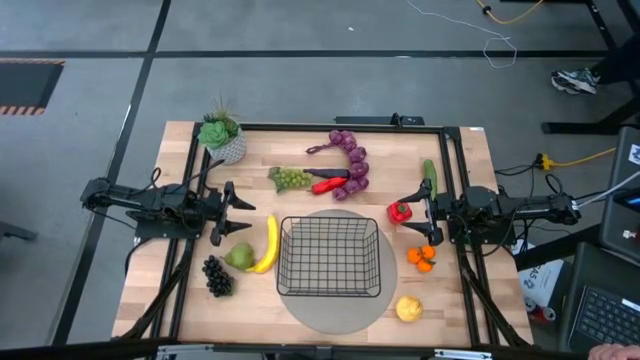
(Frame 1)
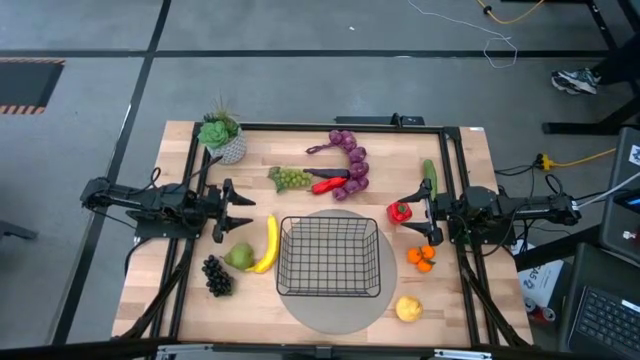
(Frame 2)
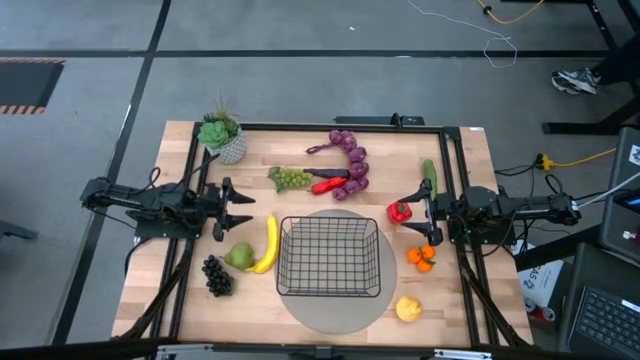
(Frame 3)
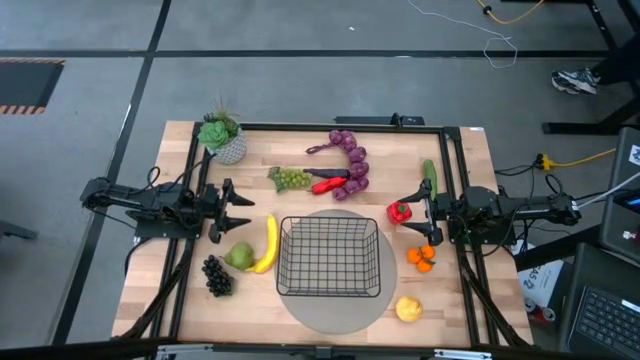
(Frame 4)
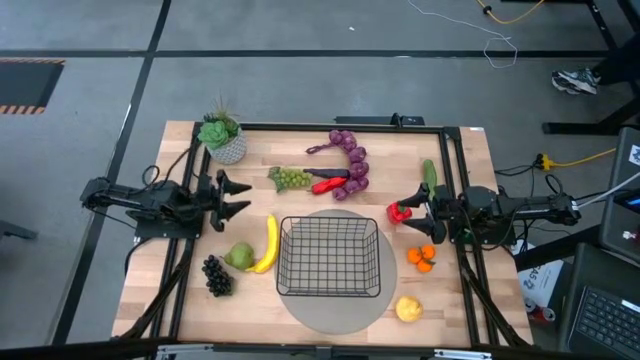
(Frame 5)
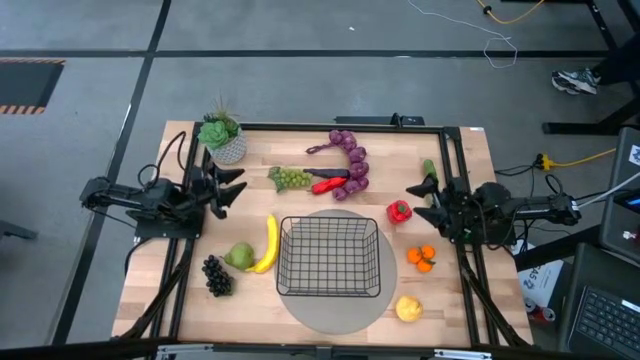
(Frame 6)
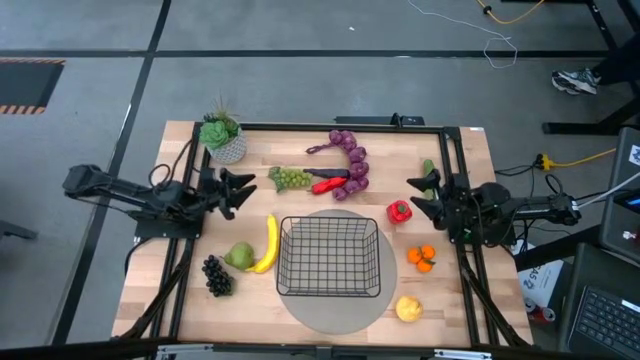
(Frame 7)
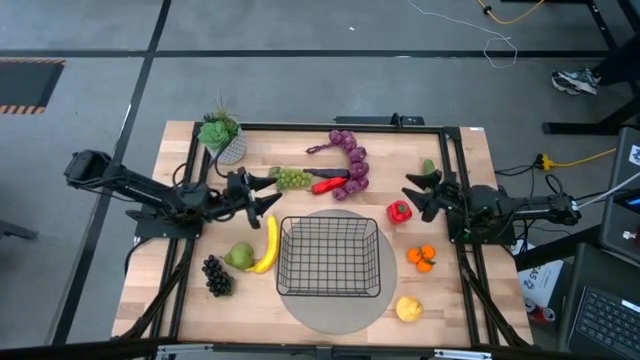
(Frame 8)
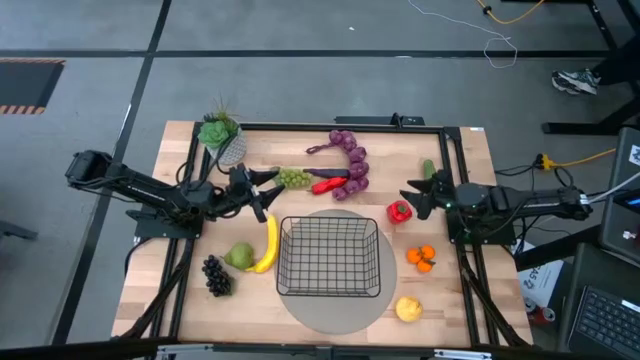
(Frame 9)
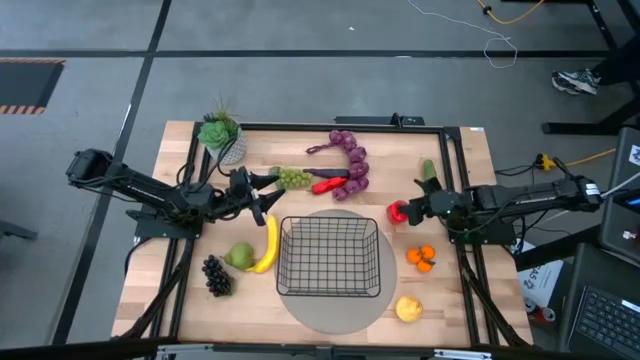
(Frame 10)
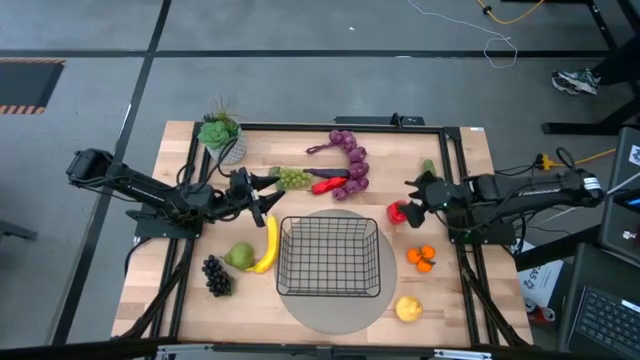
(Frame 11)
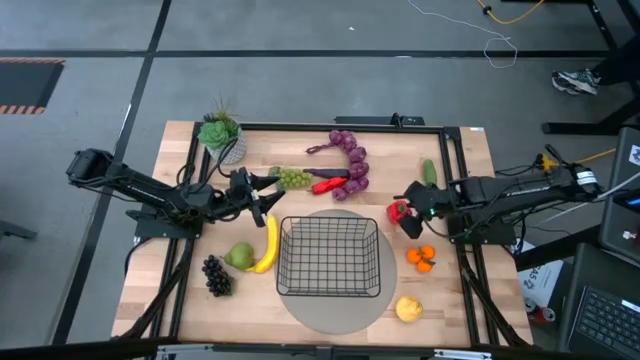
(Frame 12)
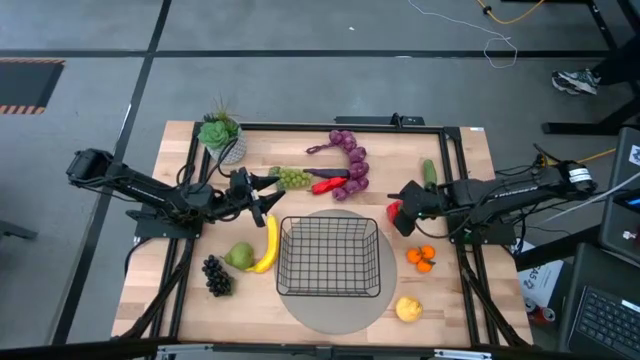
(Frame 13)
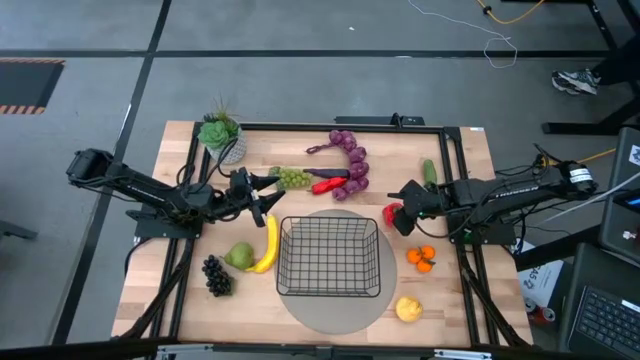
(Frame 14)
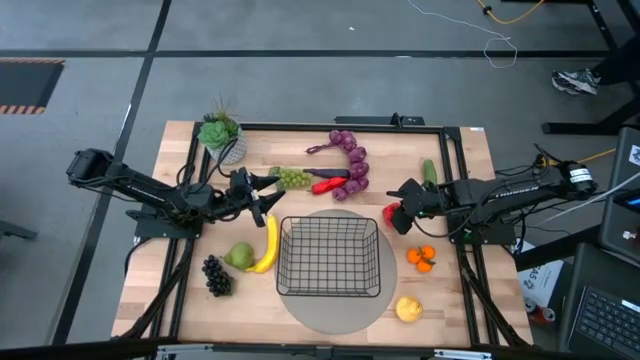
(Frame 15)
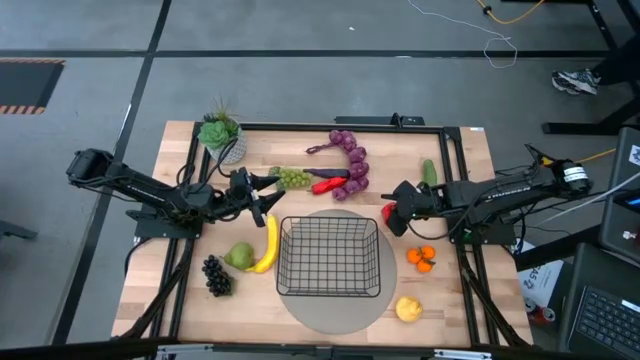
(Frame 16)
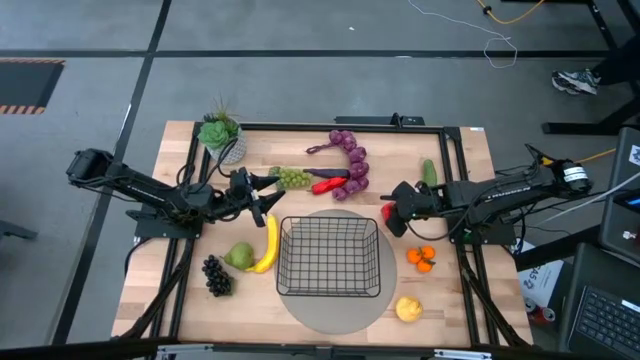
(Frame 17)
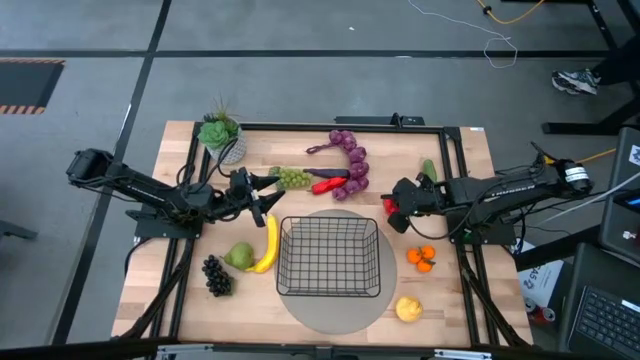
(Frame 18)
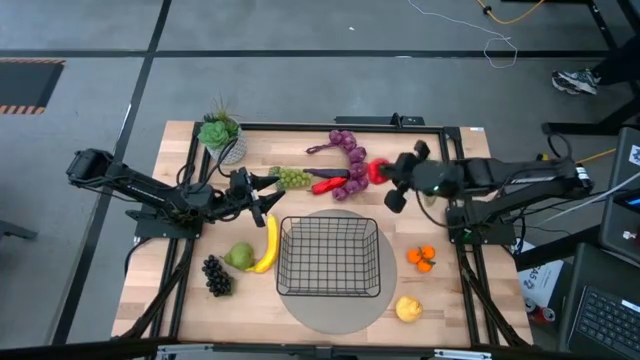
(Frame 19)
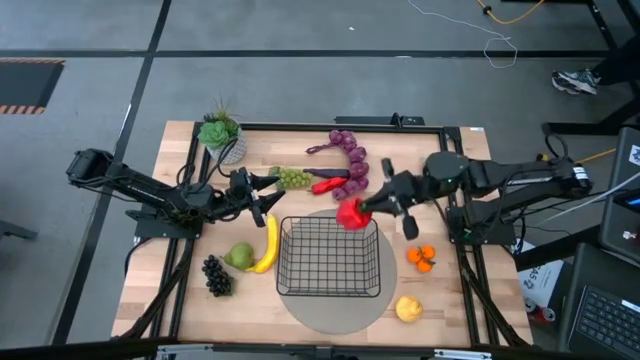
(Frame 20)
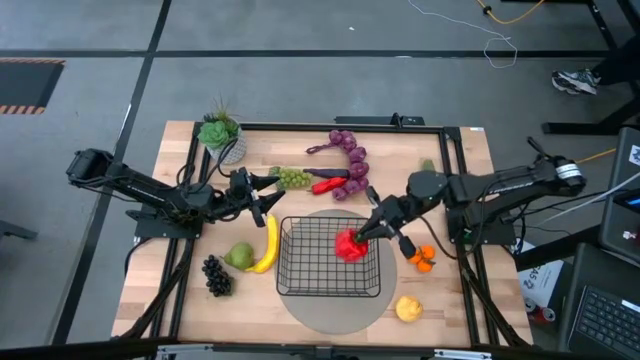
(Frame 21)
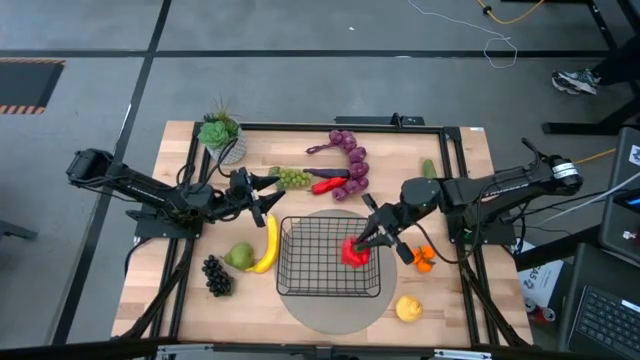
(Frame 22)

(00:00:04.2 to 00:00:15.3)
Task: Build produce basket
Put the red bell pepper into the wire basket

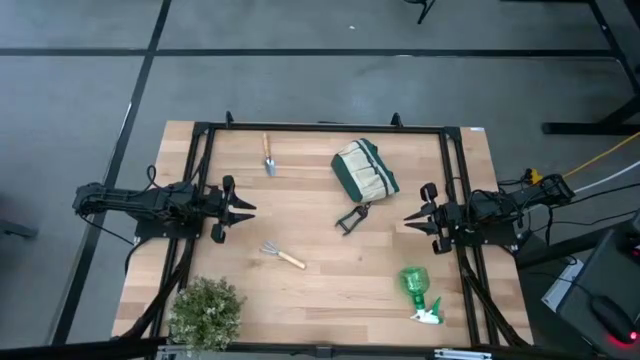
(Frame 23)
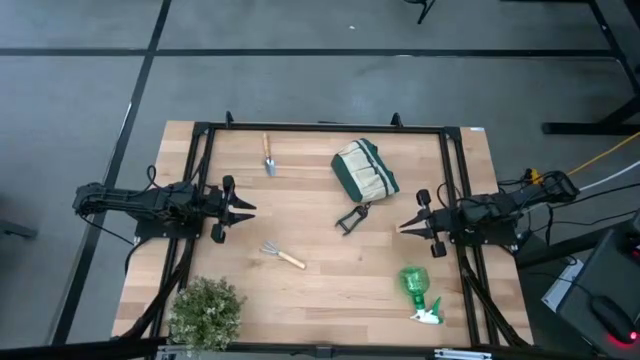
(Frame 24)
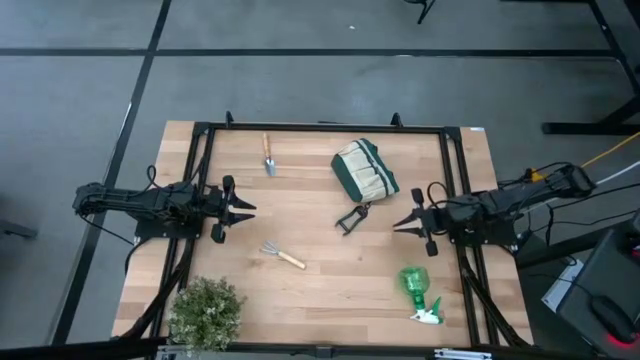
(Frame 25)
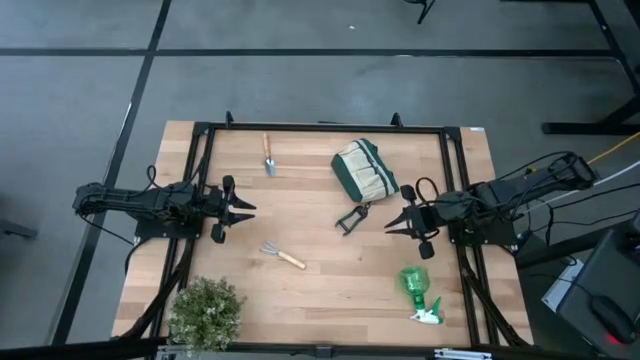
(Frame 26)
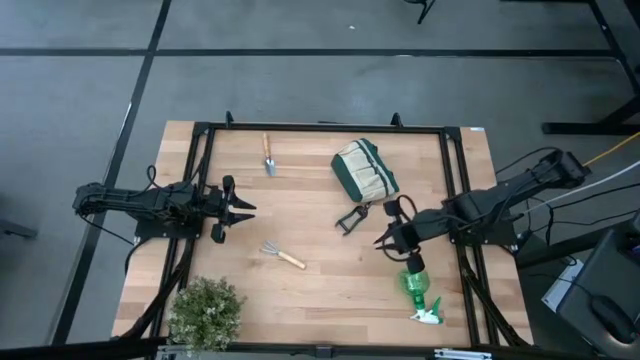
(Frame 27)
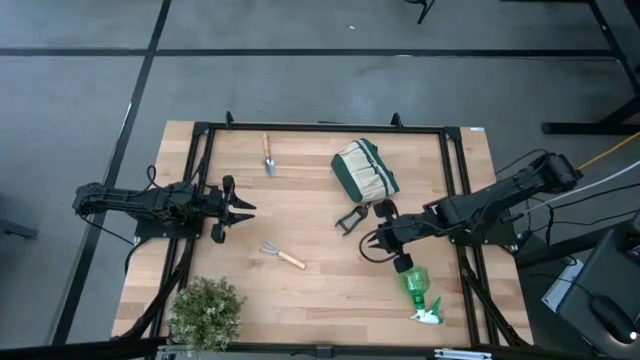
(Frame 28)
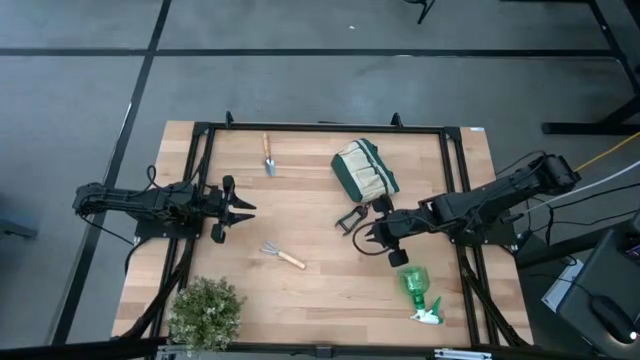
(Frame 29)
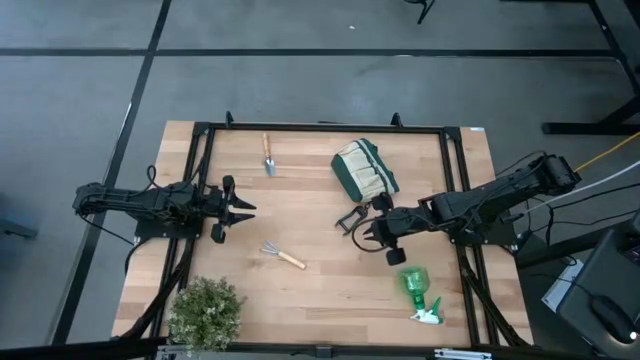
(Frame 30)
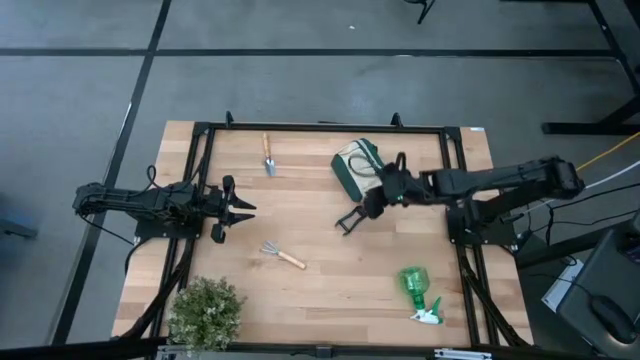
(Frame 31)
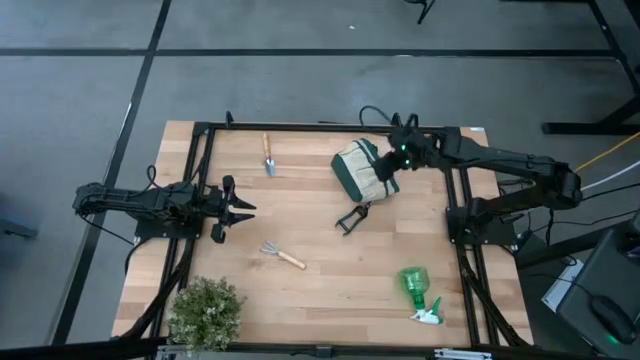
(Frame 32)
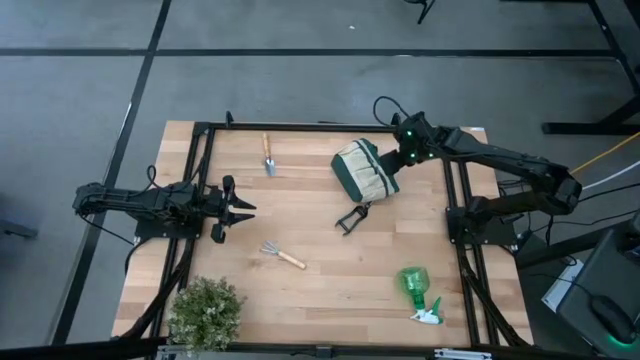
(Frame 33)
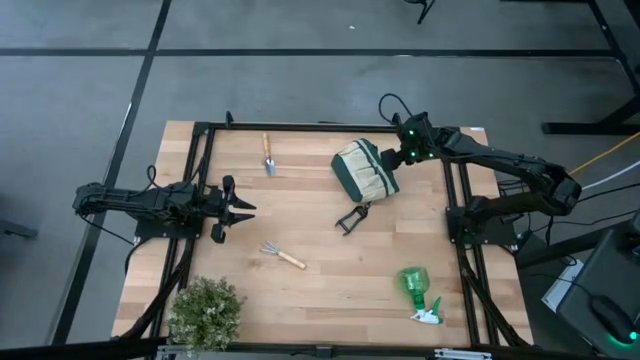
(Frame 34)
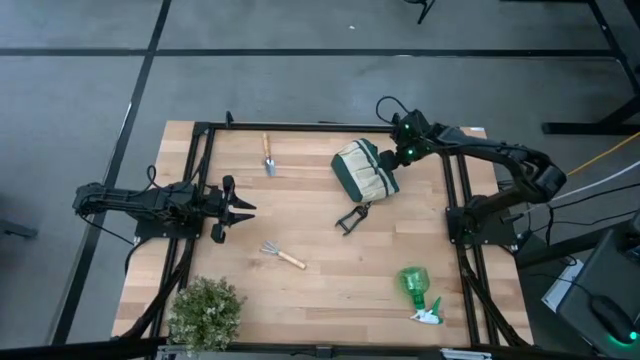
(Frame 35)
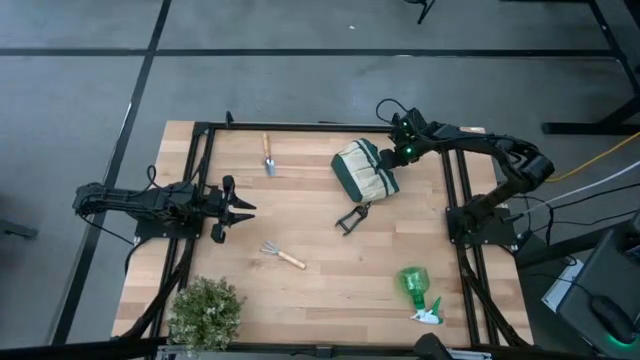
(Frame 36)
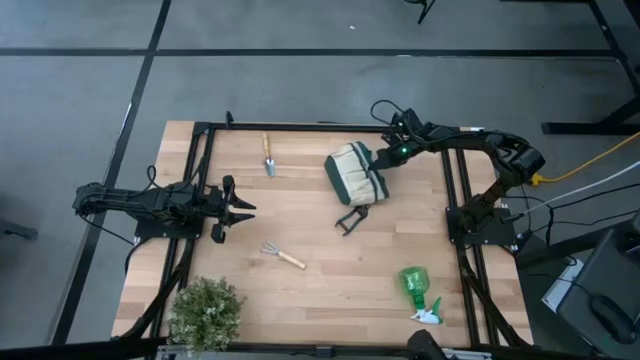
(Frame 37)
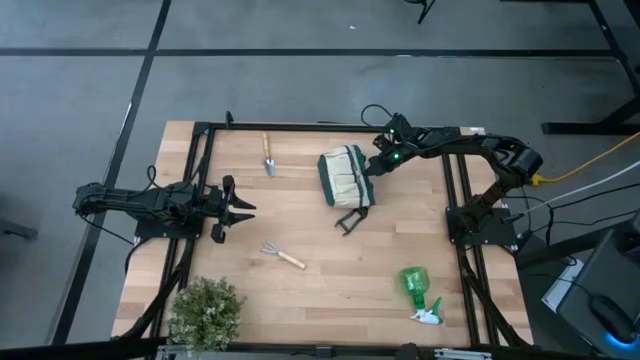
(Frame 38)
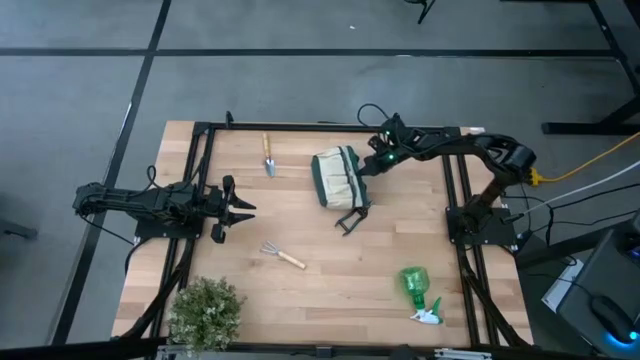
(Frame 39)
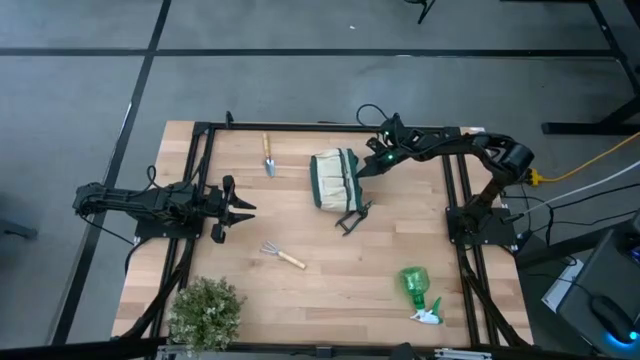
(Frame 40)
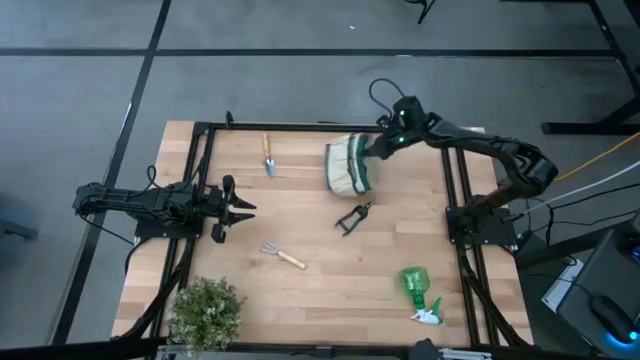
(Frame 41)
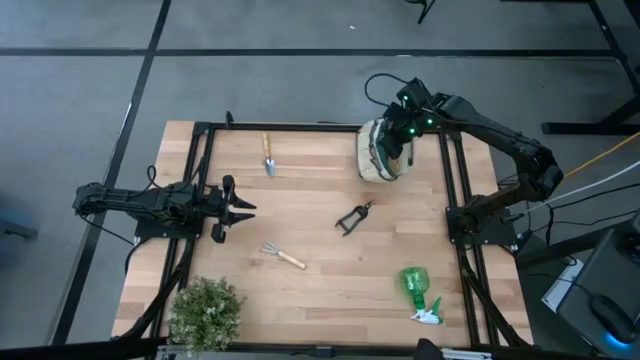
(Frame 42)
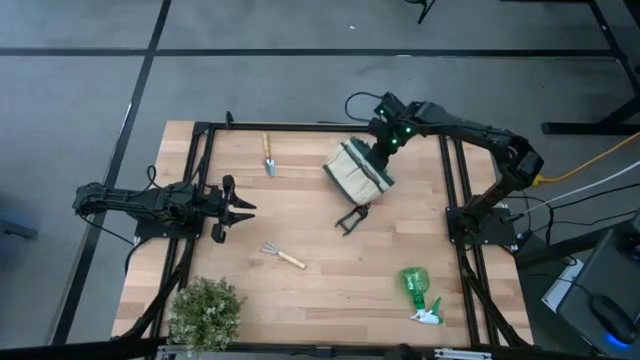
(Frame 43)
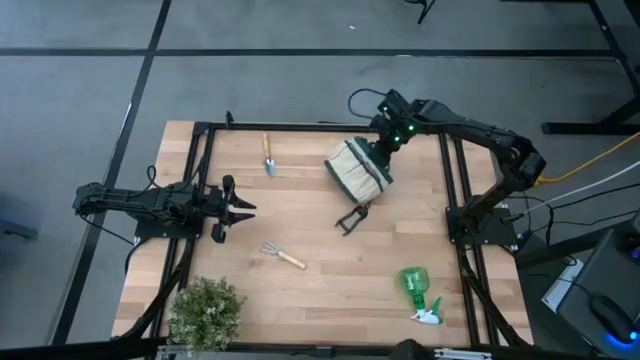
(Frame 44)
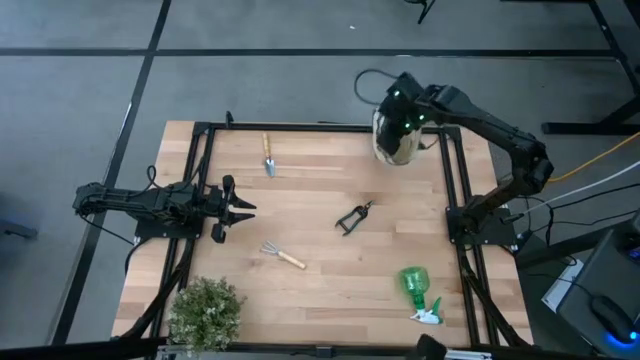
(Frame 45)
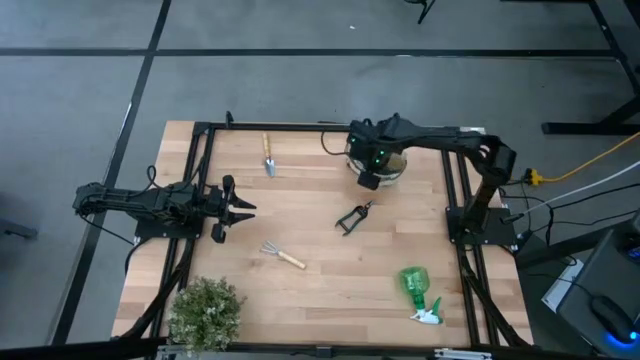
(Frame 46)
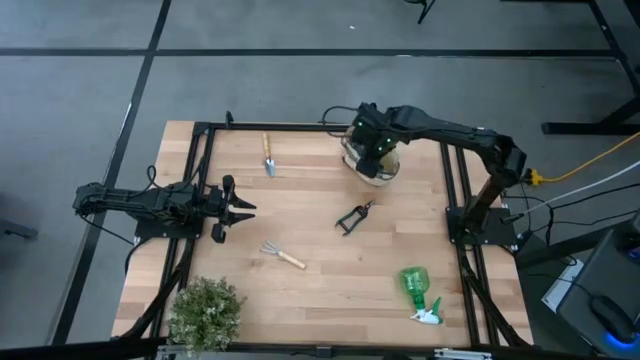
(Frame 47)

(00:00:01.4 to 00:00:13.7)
Task: Pick & Place Garden tools in Gardening bag
Prepare the white bag
